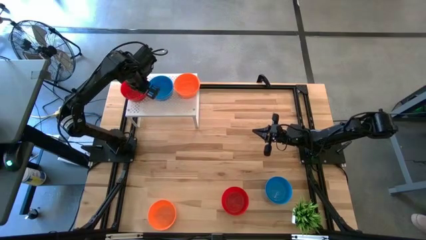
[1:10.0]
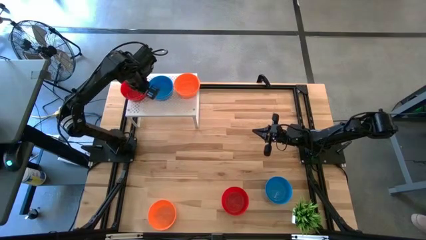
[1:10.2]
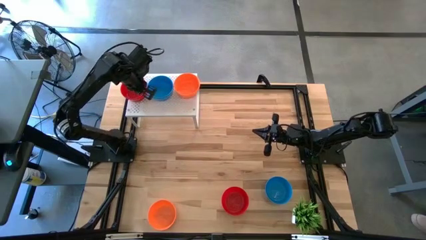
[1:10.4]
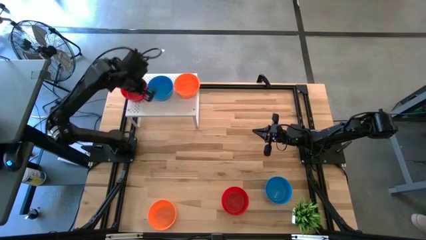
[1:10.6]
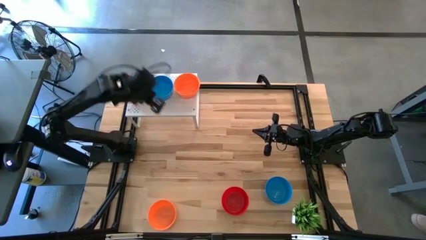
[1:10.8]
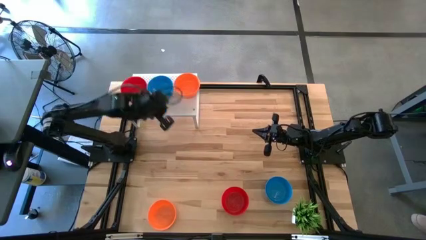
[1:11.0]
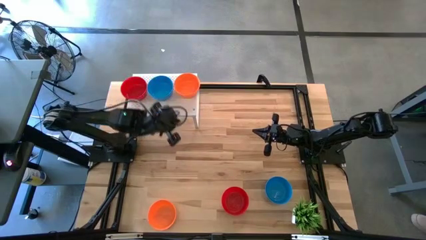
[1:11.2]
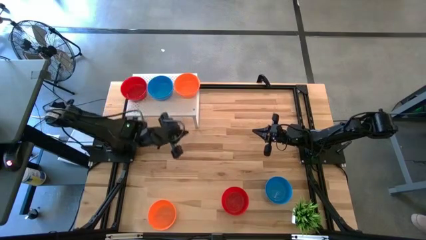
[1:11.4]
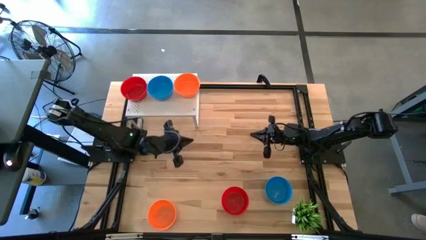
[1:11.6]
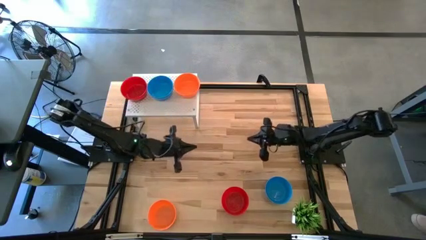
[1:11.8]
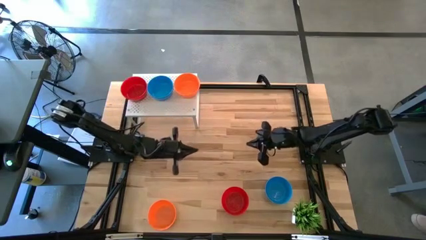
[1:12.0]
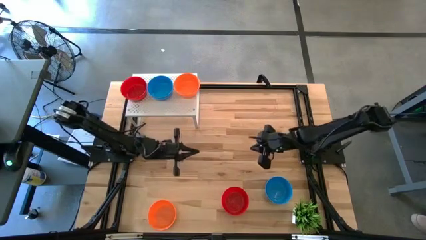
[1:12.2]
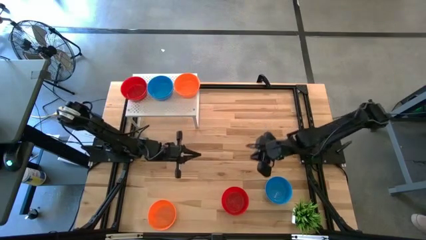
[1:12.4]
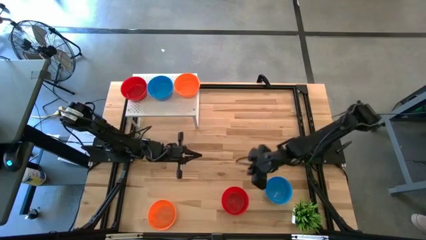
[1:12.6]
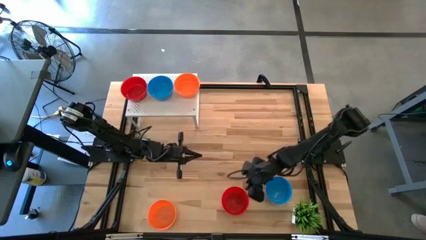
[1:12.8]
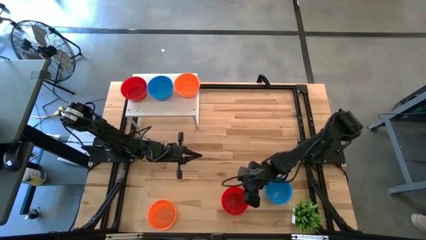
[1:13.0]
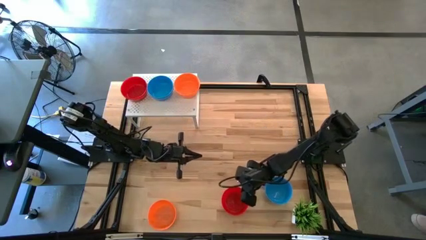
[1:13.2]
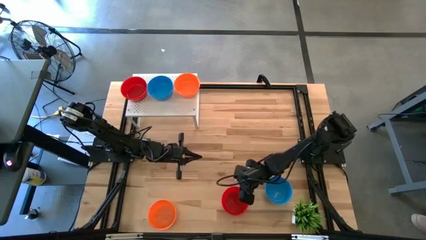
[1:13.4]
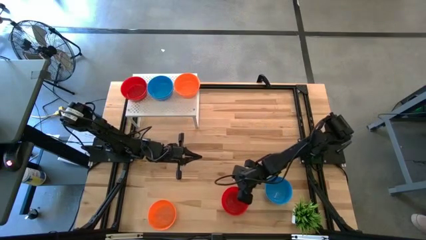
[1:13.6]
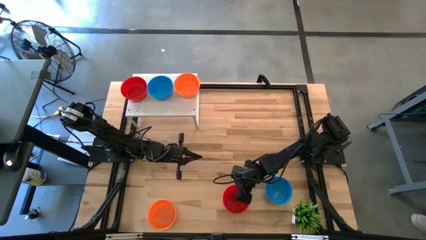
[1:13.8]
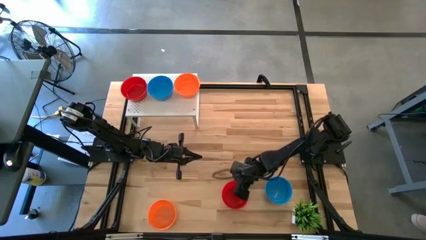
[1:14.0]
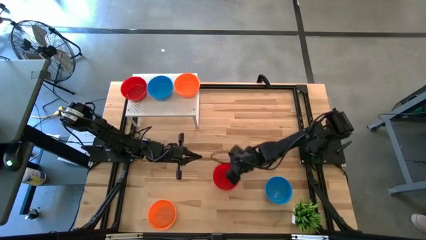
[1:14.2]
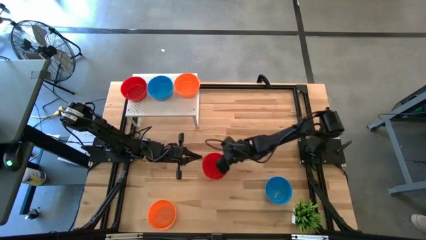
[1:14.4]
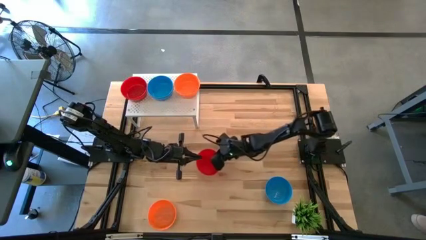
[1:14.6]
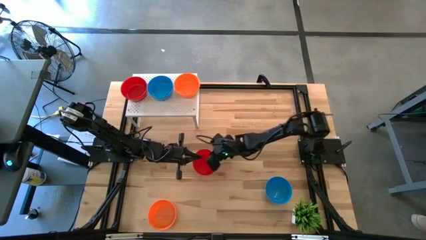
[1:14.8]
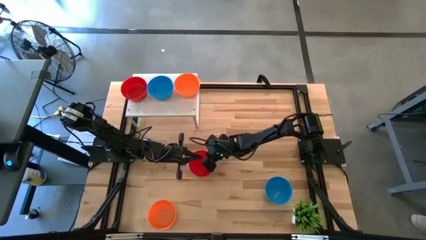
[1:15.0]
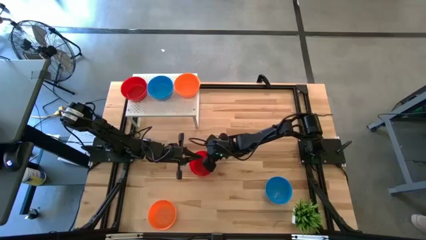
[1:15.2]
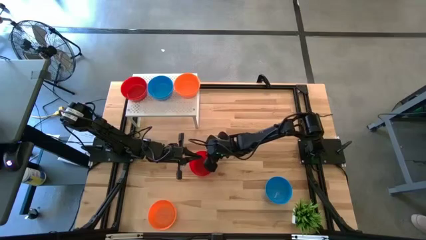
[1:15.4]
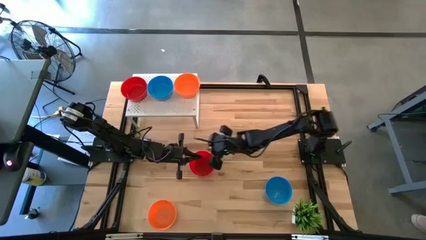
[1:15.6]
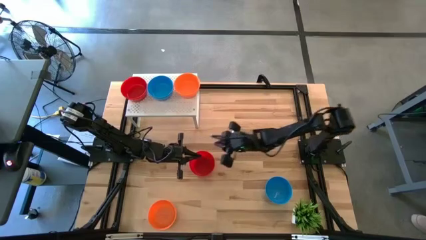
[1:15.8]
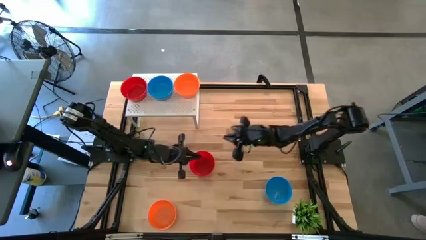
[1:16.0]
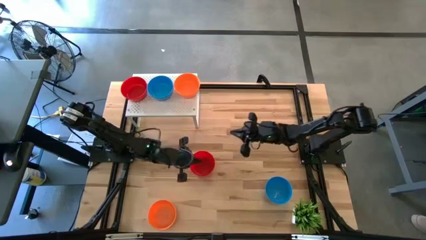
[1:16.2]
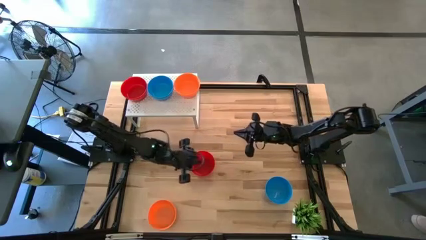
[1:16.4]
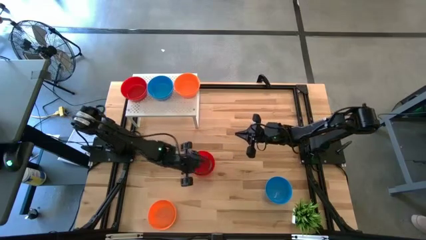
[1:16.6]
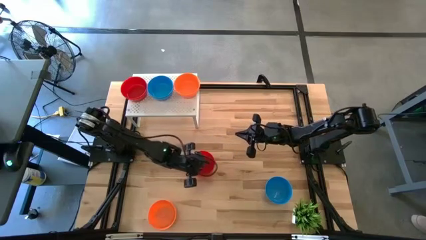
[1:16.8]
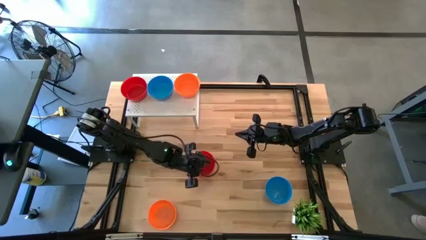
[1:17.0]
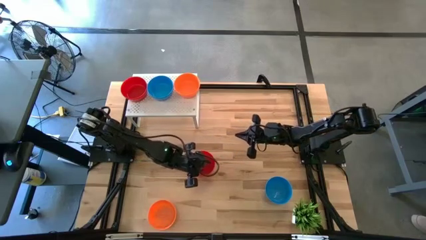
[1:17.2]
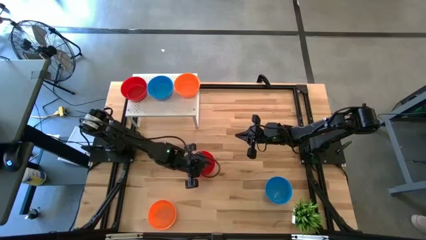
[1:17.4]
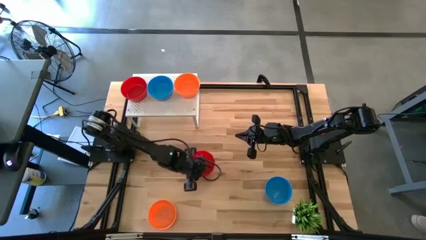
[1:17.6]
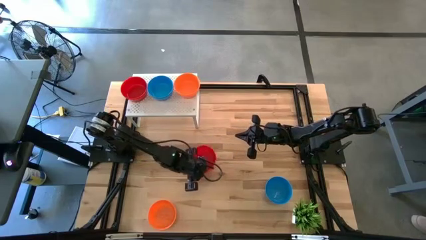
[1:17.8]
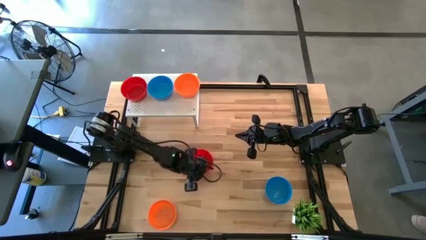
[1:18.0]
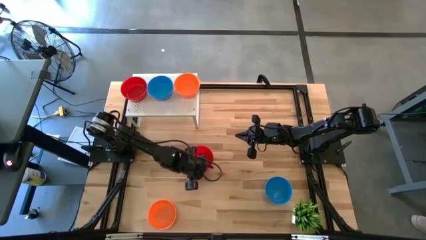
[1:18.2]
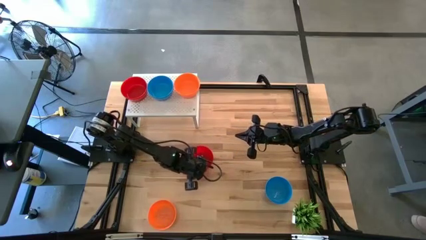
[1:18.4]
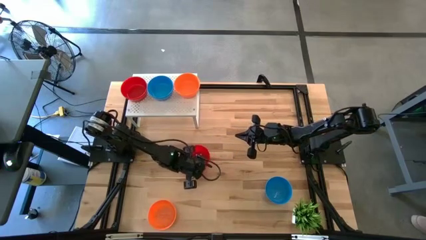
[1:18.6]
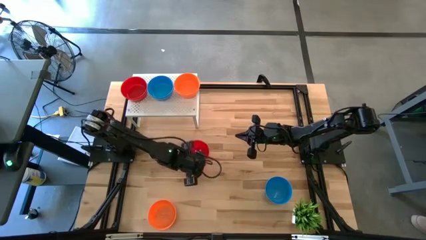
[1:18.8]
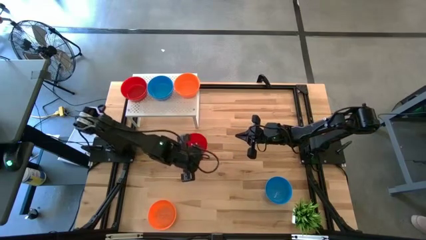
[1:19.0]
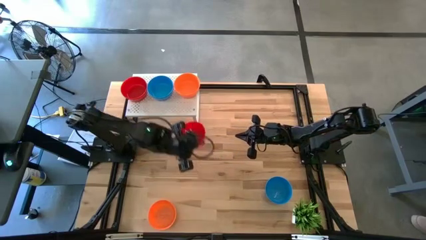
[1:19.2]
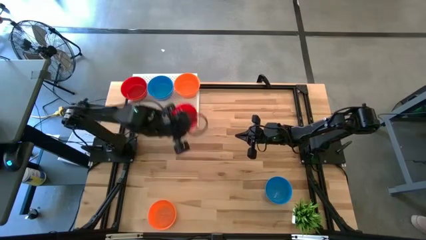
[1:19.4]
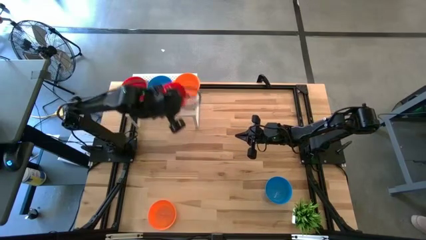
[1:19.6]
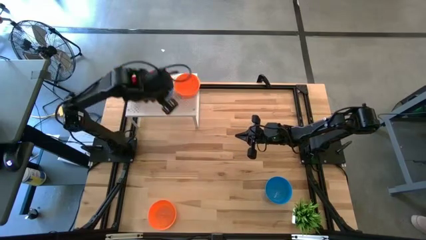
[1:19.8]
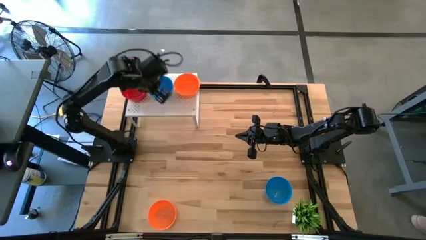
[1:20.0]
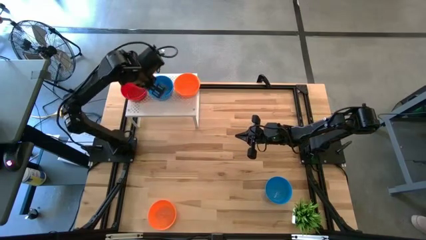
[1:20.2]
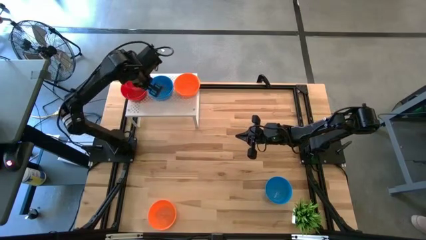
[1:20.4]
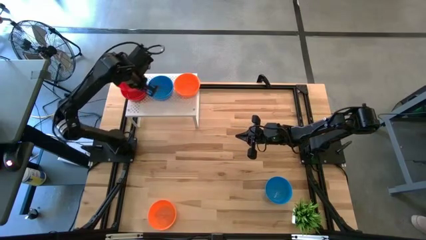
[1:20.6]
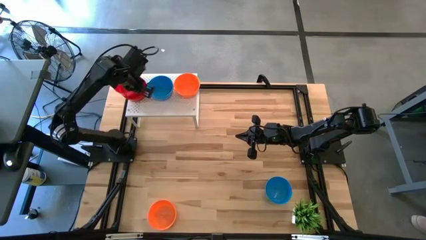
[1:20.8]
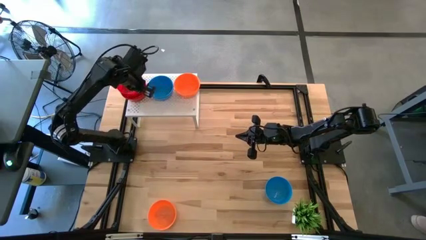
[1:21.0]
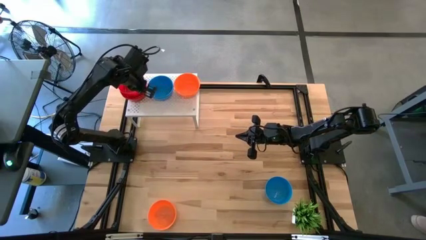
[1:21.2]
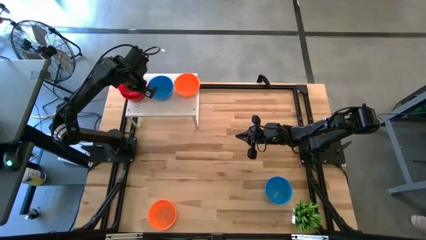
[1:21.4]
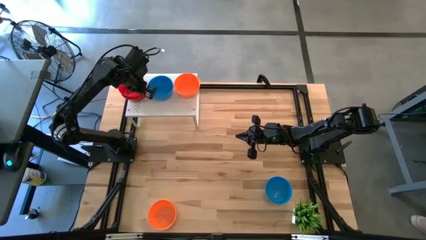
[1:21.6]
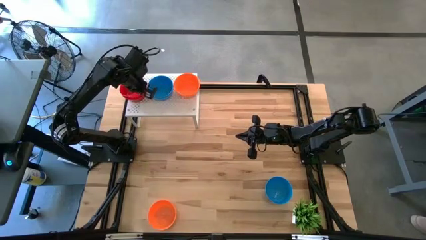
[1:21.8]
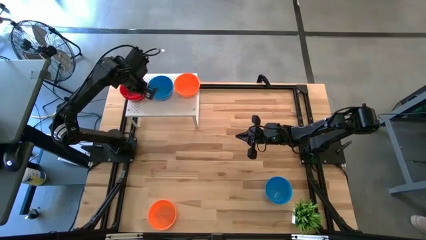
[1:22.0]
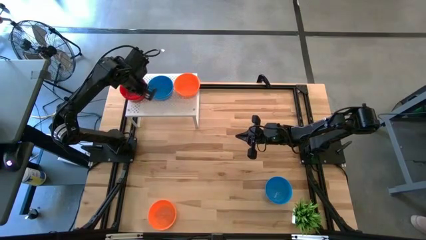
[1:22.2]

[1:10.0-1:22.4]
Task: Pick & Place Mini bowls
Stack the red bowl on the red bowls on the shelf
